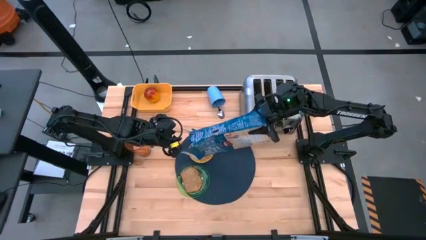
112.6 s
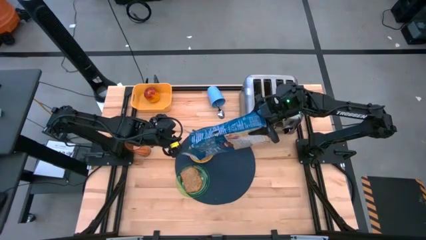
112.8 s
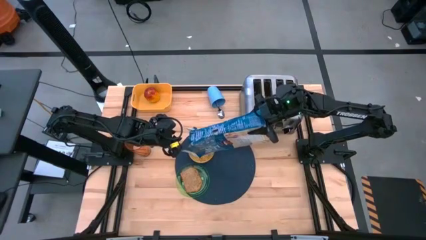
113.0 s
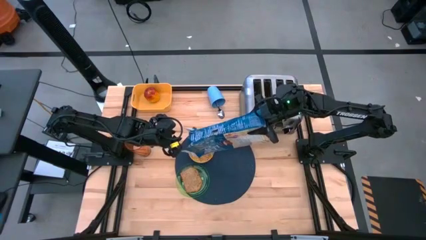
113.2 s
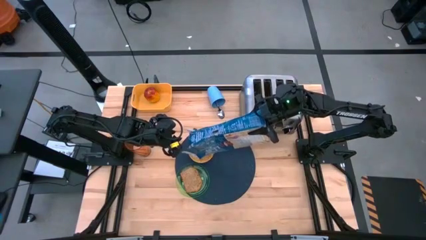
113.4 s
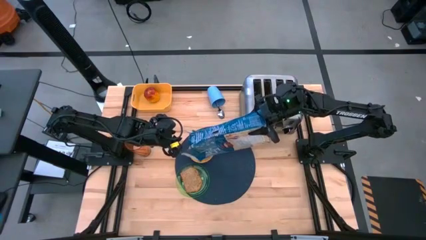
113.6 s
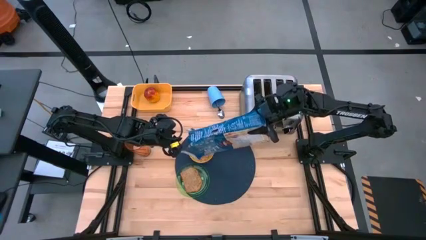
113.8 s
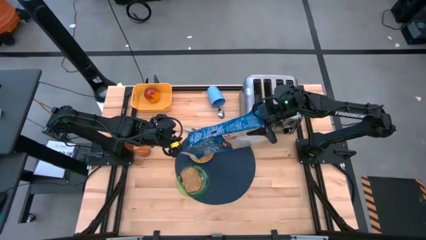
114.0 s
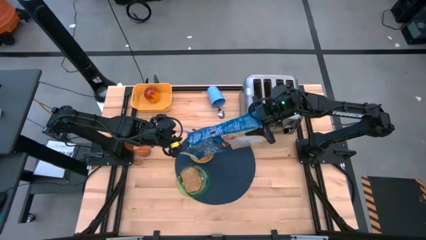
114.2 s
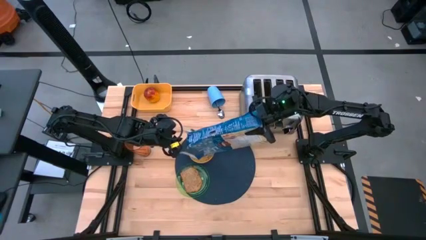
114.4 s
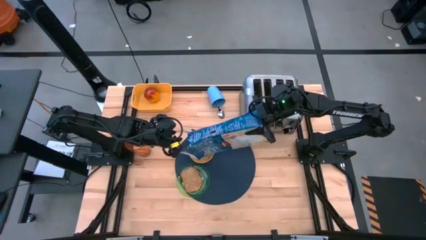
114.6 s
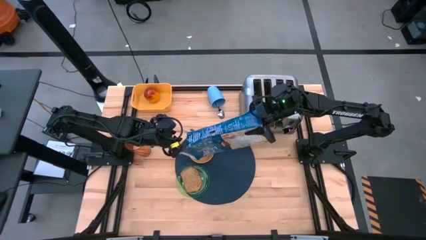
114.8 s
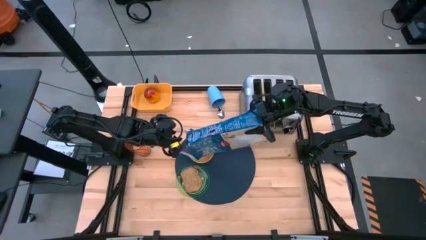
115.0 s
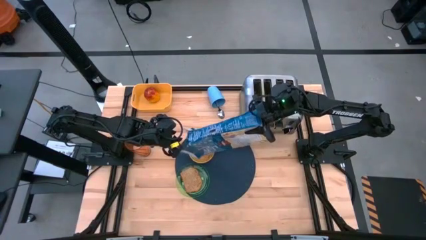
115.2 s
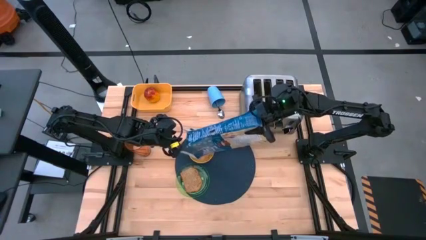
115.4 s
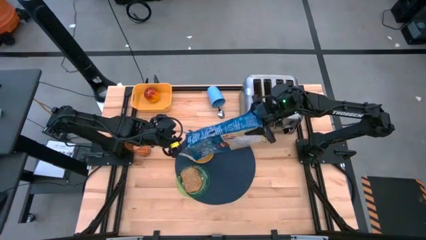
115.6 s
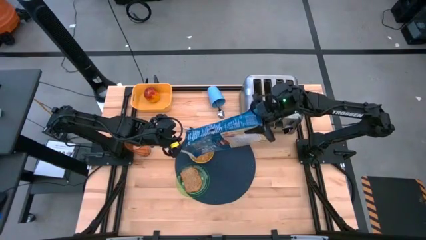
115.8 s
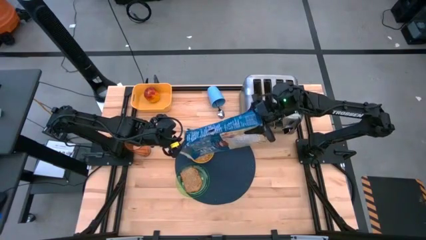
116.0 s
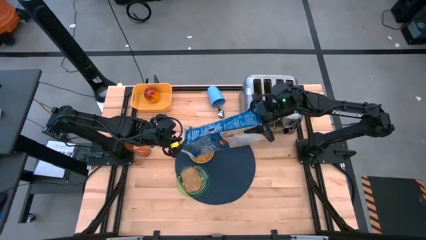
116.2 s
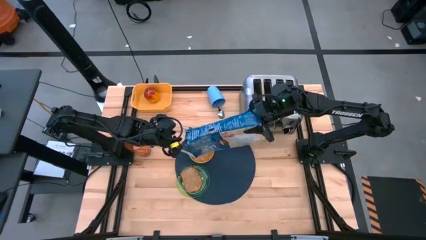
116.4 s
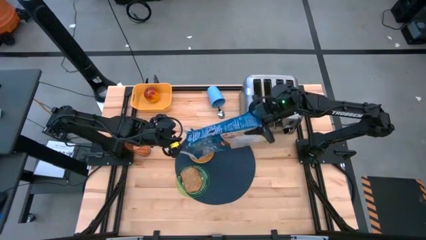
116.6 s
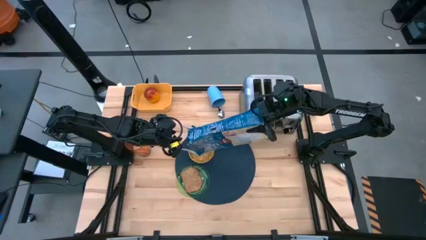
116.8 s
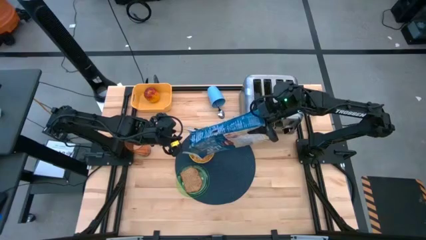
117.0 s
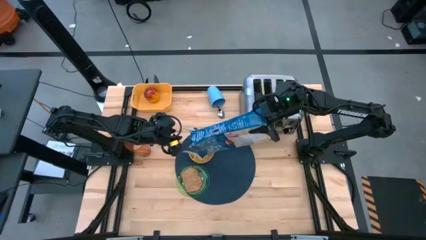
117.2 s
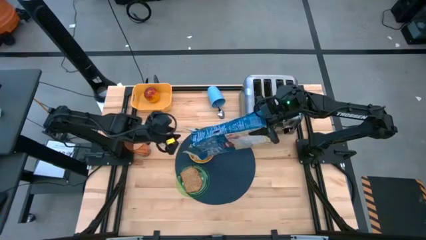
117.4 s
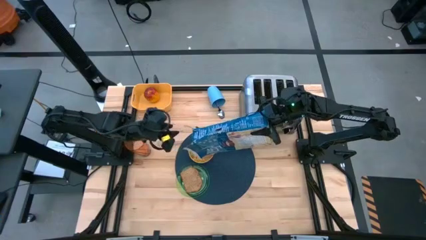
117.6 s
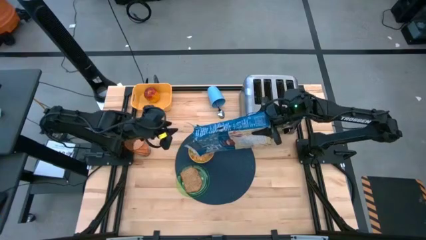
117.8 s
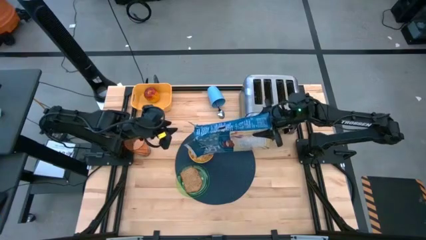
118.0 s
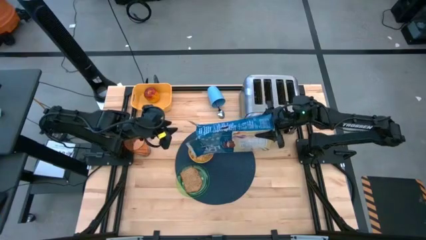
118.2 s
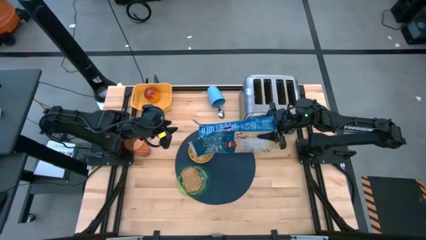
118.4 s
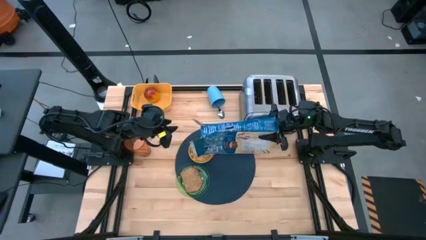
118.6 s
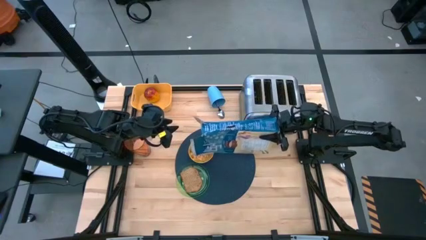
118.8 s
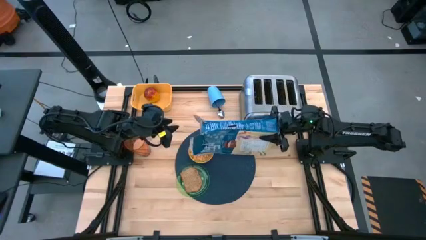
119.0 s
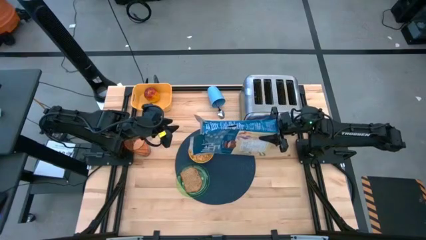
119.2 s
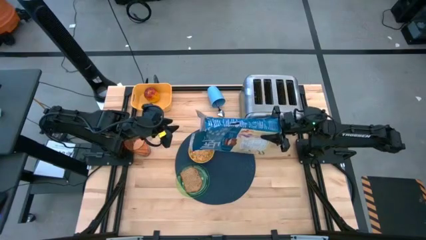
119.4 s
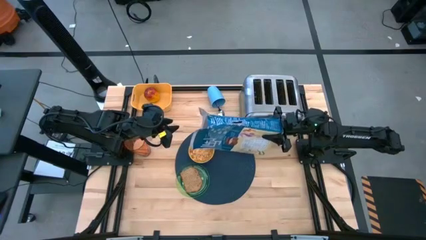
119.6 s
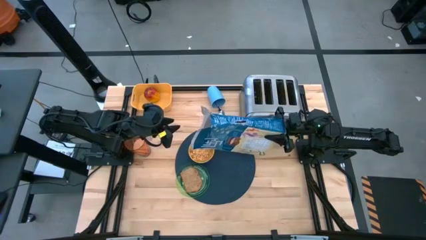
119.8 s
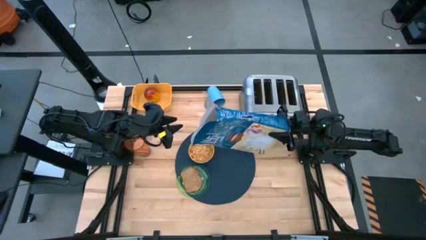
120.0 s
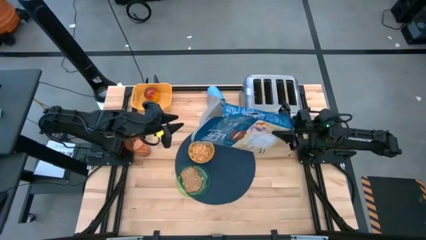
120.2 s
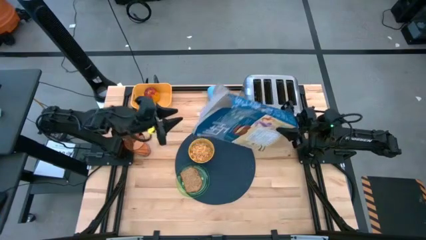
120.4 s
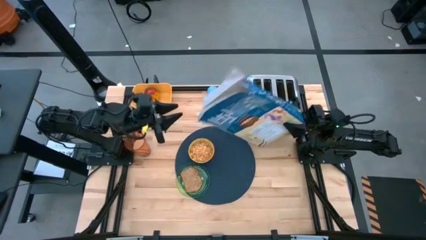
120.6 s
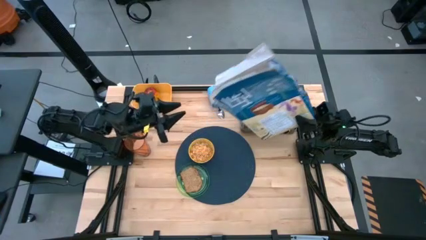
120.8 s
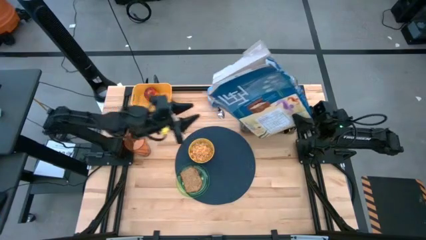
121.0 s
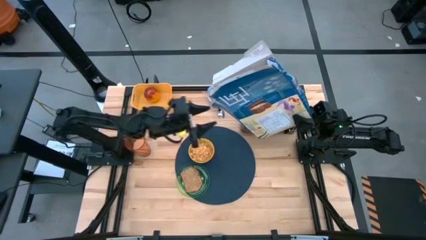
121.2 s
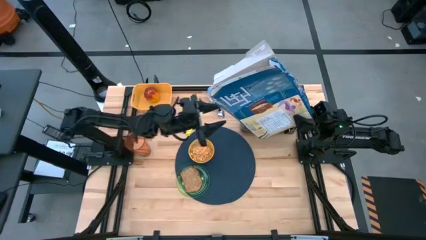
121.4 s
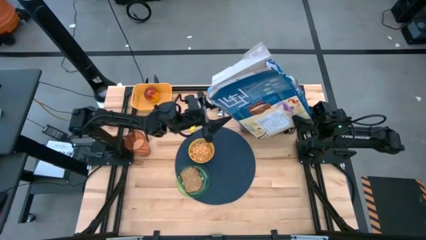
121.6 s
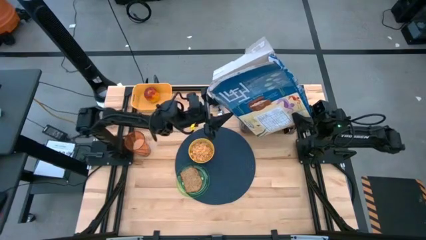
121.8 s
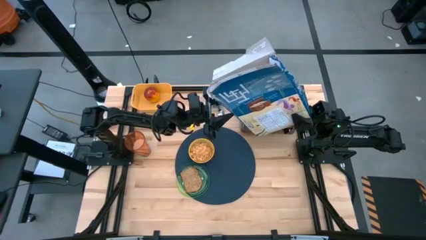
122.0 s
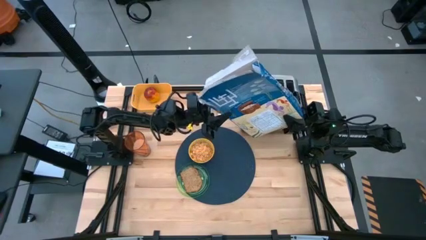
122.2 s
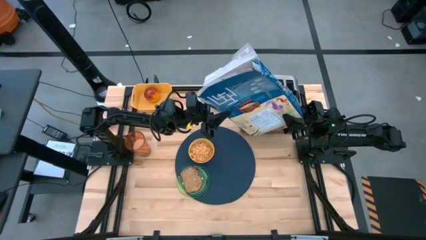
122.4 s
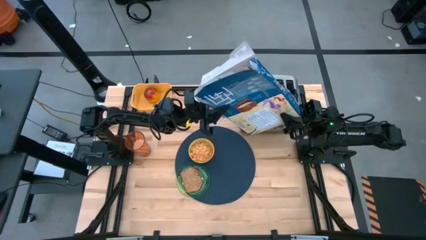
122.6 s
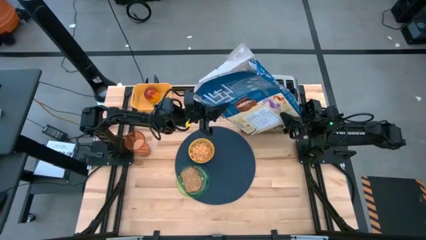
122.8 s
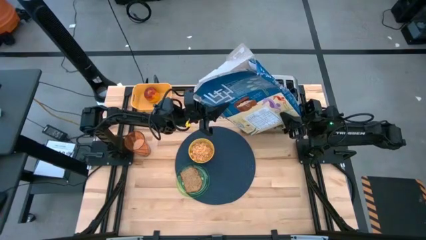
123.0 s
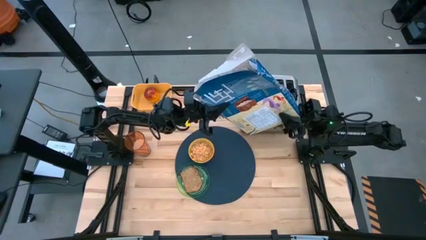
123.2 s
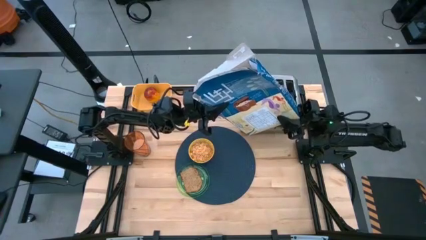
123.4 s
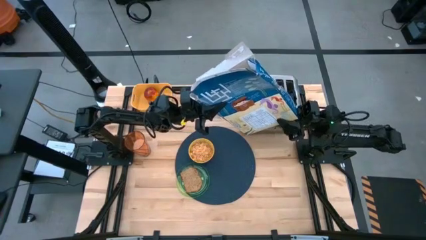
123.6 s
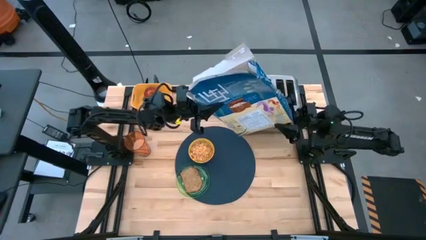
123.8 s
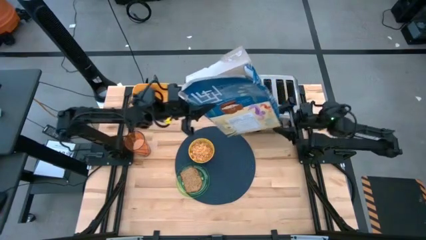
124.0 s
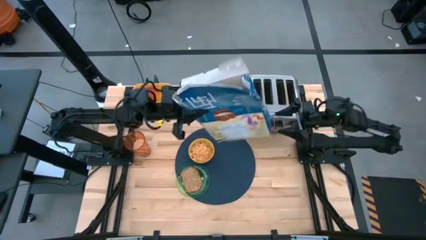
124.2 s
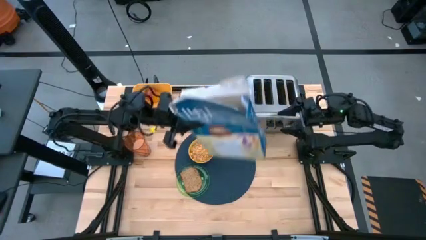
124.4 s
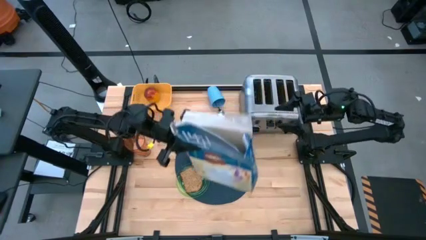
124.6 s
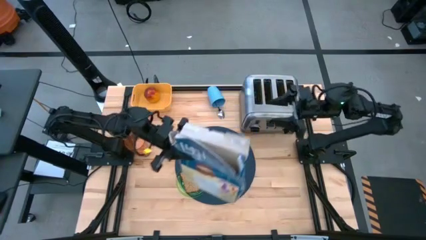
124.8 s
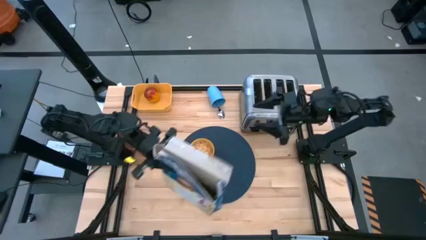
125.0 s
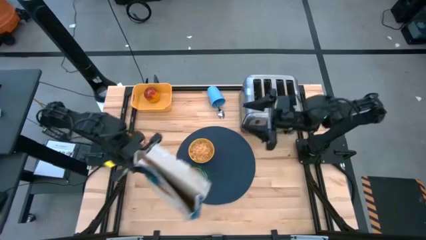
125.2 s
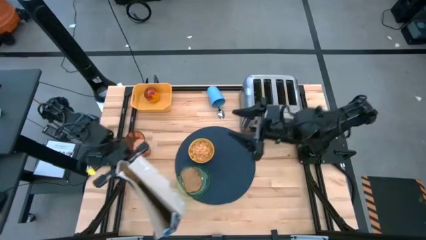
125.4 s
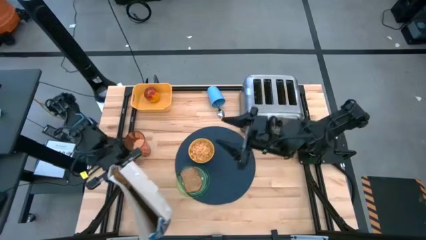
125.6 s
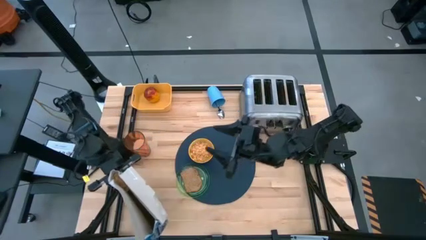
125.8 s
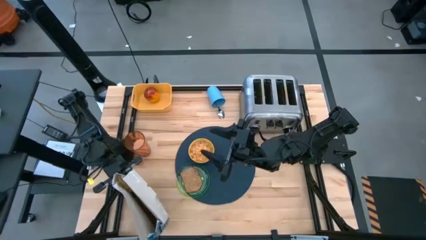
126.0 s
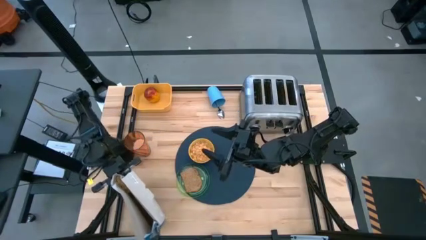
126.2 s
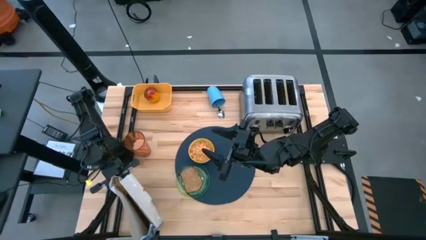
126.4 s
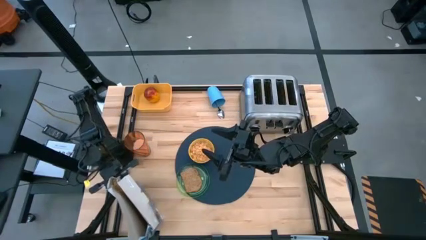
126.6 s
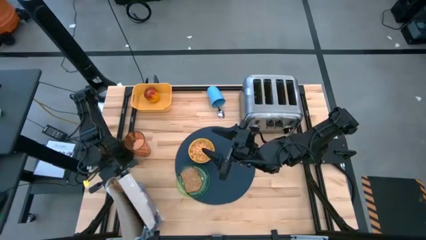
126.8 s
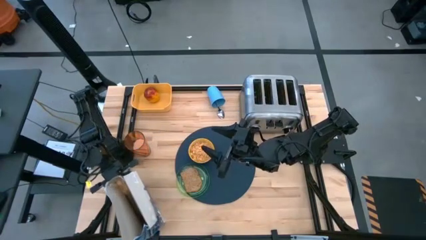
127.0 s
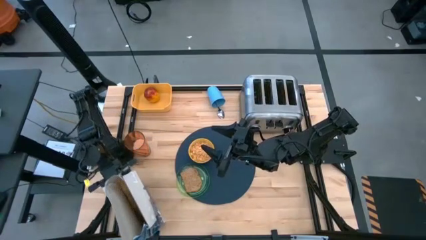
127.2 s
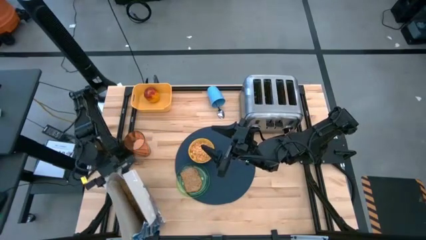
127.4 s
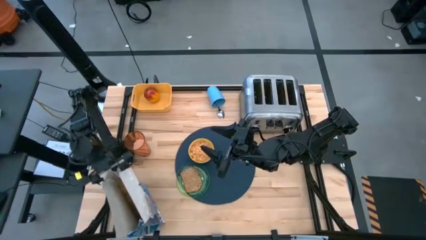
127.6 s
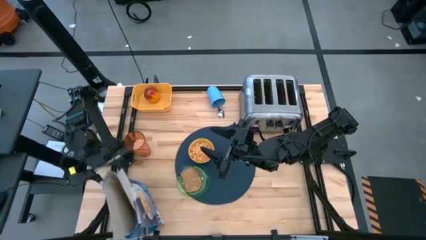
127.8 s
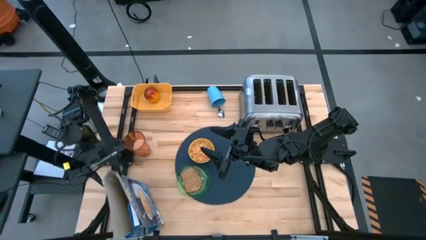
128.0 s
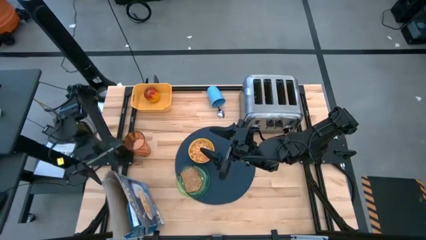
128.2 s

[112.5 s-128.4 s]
Task: Arrange a breakfast setting
Pour the cereal in the yellow bowl on the dark blue table mat
